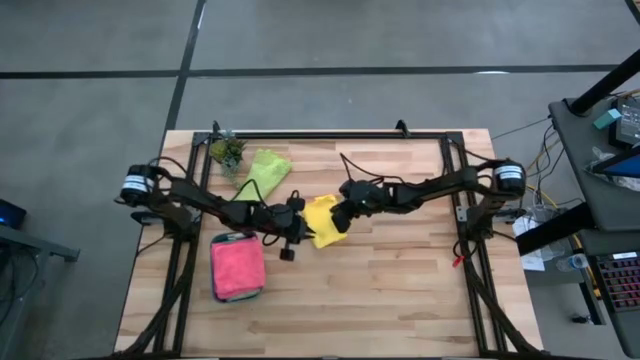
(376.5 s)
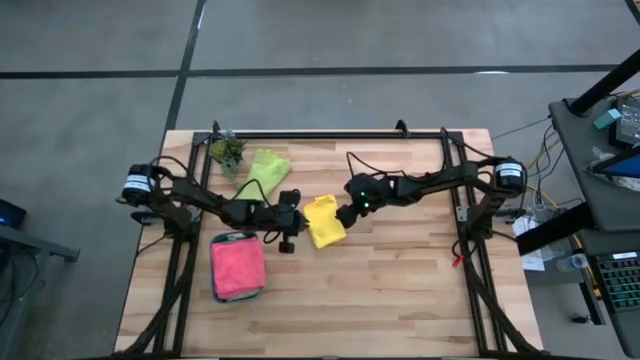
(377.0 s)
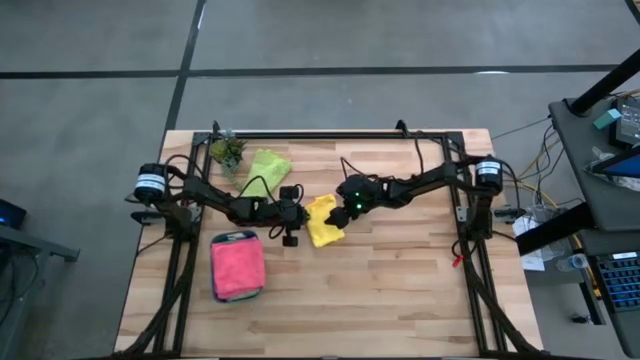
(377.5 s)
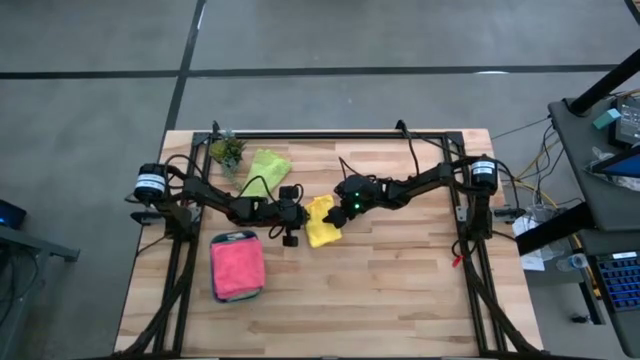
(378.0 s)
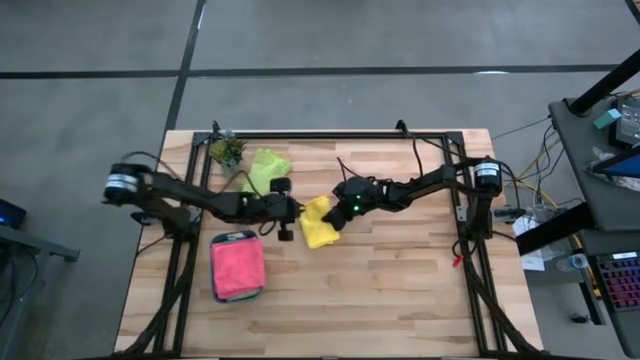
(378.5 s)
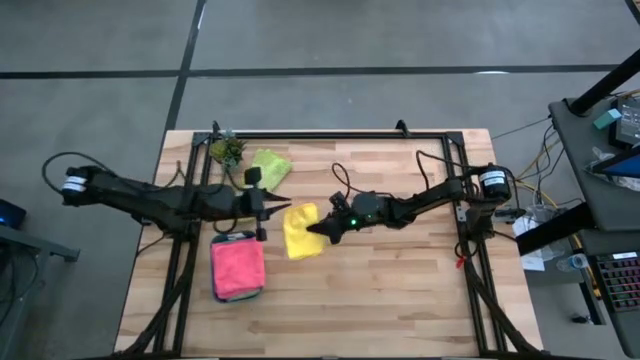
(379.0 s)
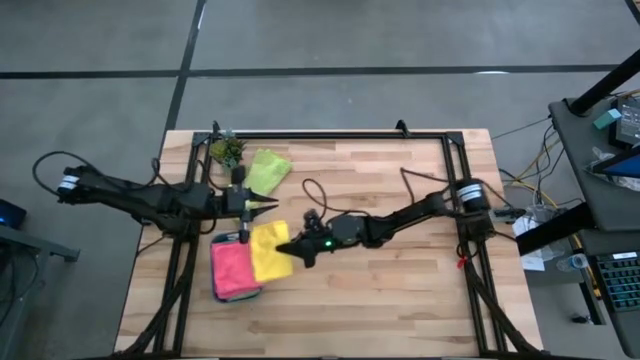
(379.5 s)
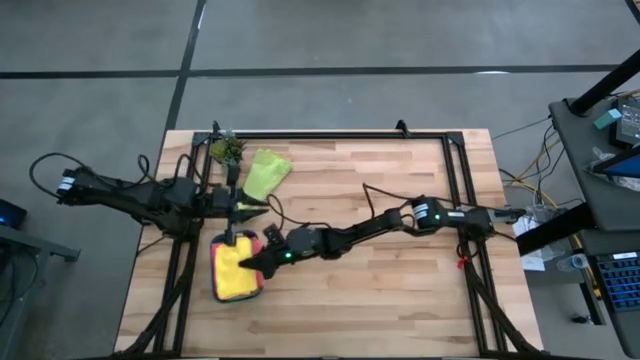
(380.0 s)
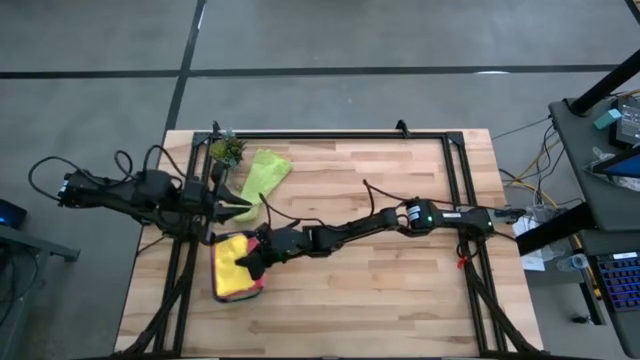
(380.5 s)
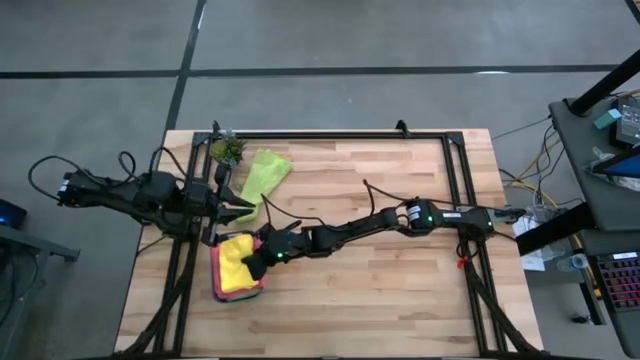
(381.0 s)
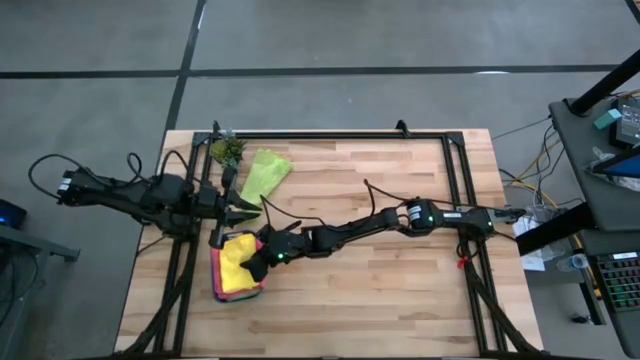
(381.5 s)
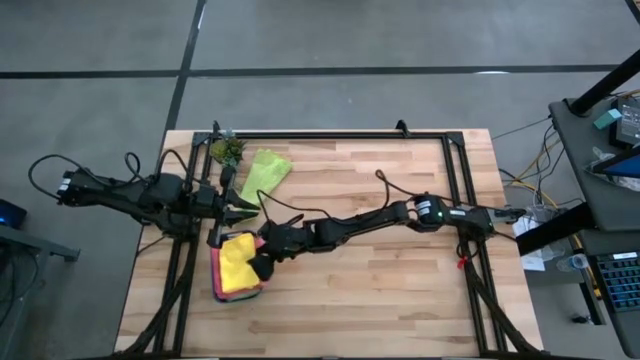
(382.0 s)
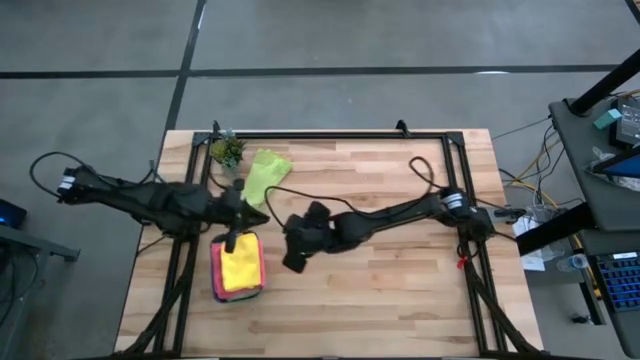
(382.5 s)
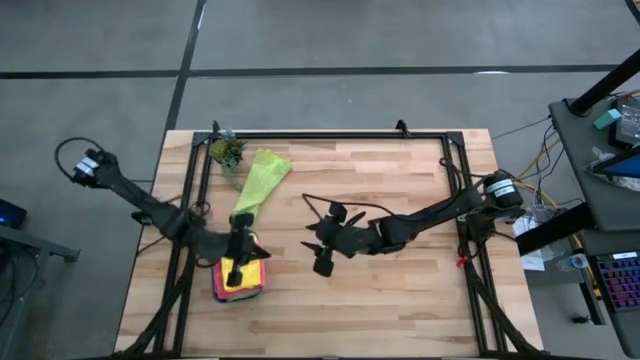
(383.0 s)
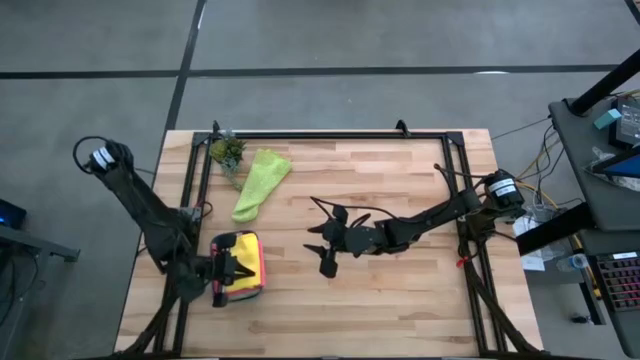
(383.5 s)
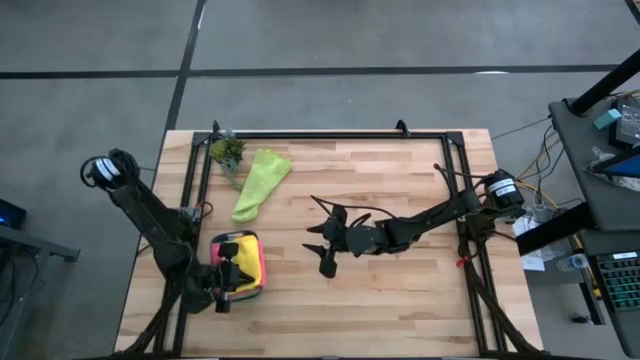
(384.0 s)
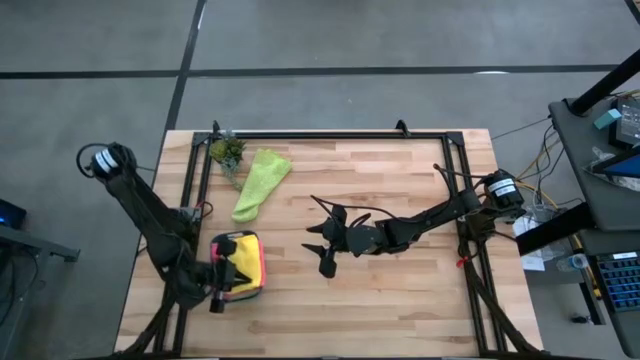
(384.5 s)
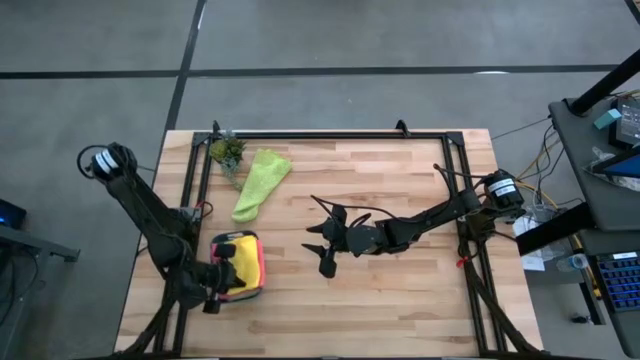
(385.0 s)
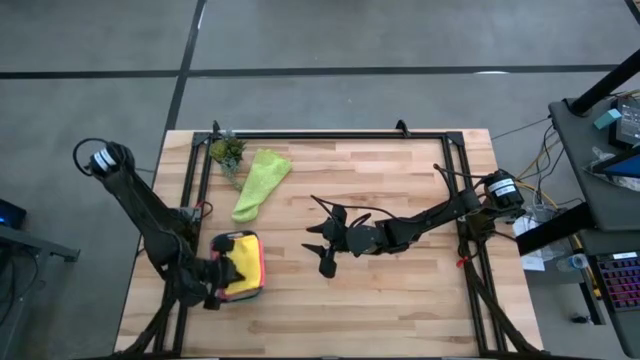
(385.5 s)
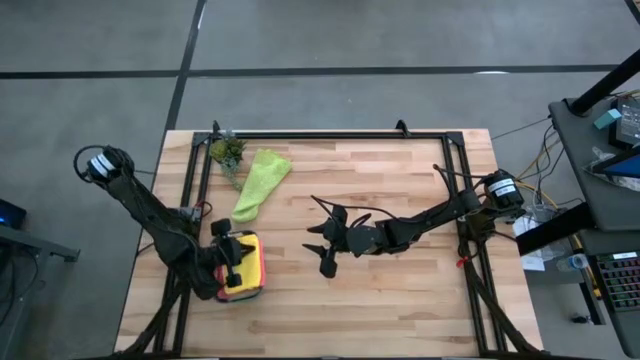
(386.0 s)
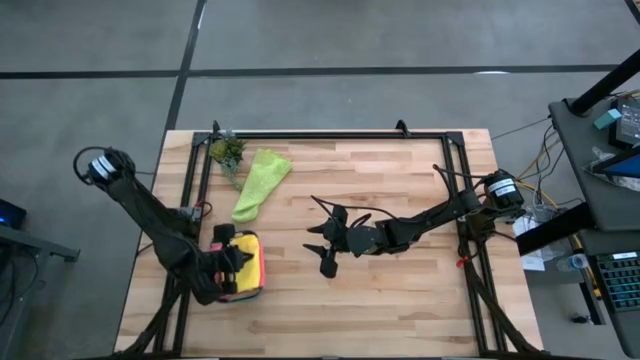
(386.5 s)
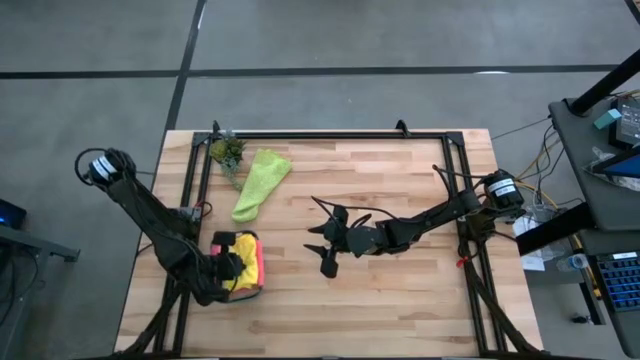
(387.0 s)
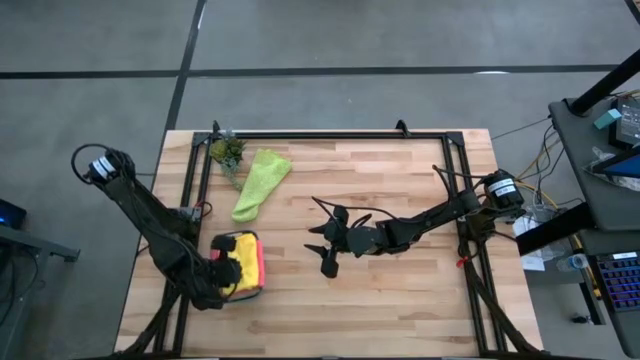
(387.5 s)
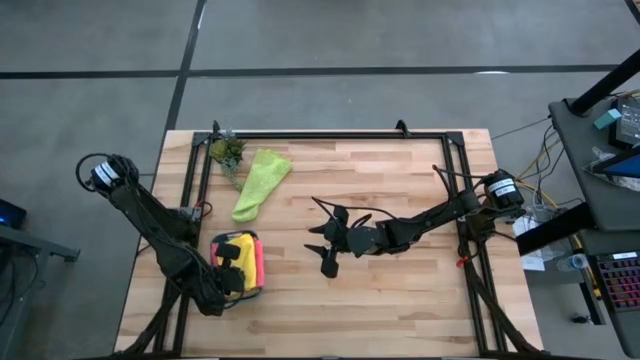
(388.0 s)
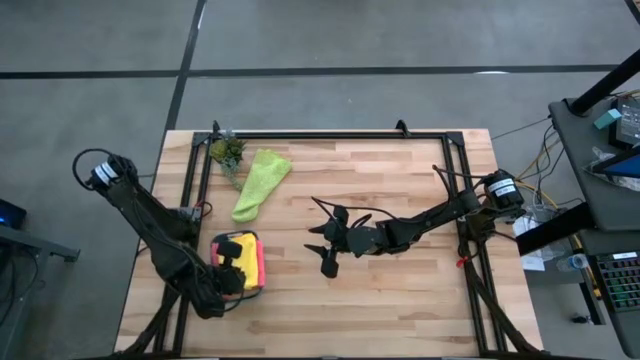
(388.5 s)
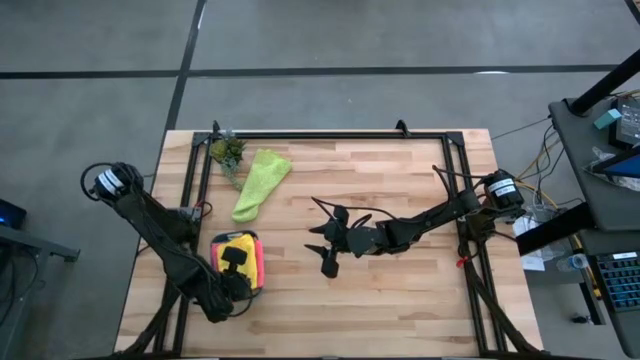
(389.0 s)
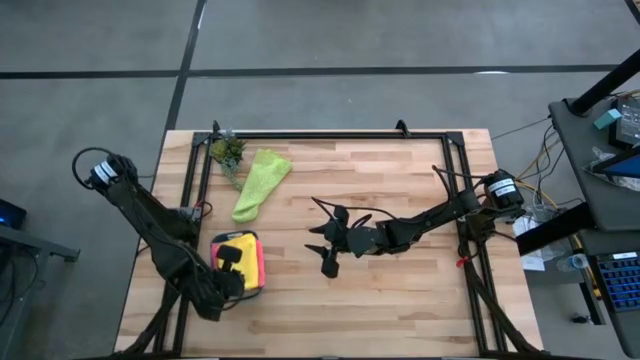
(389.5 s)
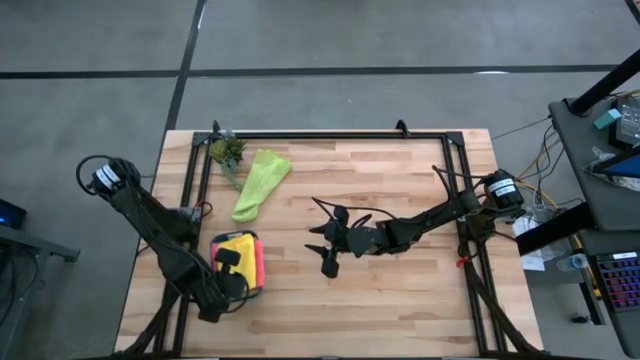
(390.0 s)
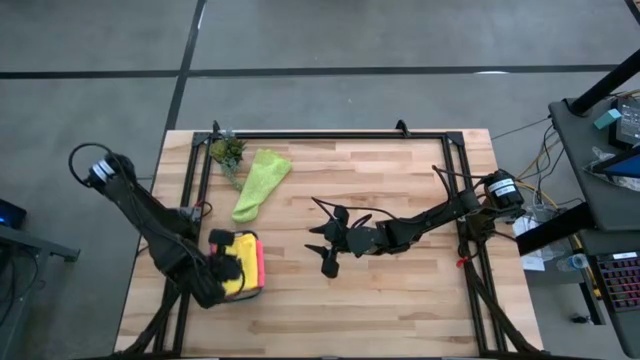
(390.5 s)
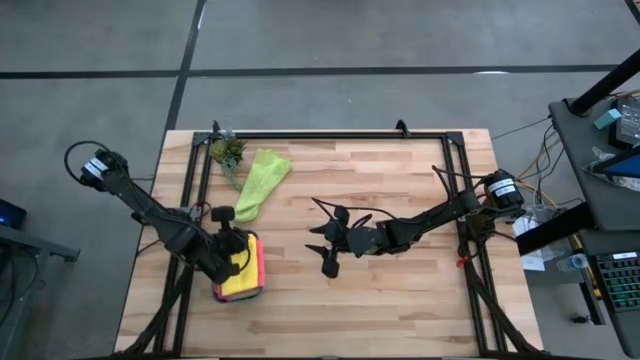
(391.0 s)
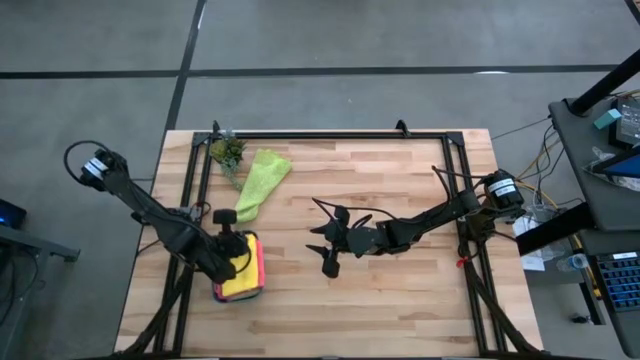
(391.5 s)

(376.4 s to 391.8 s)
Task: Fold microfiber towels
Put the yellow microfiber cloth into the blue bin

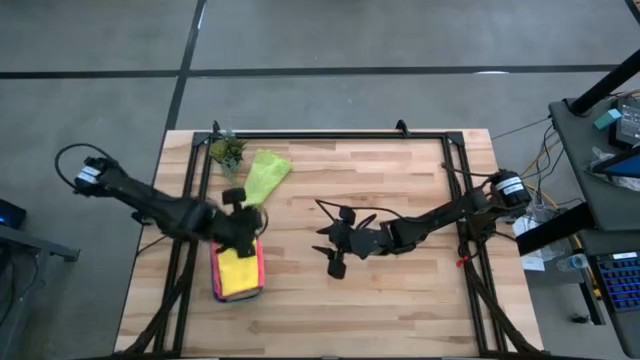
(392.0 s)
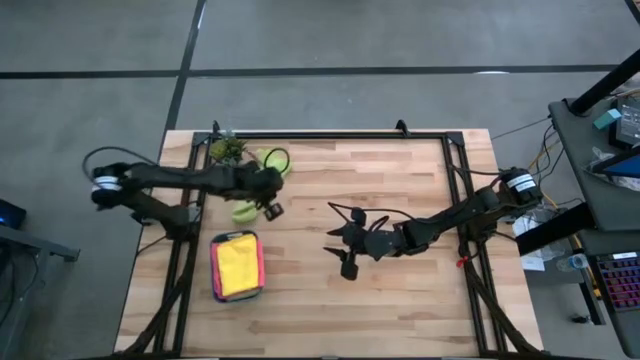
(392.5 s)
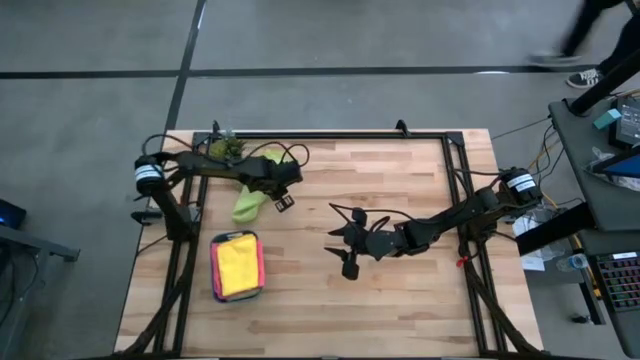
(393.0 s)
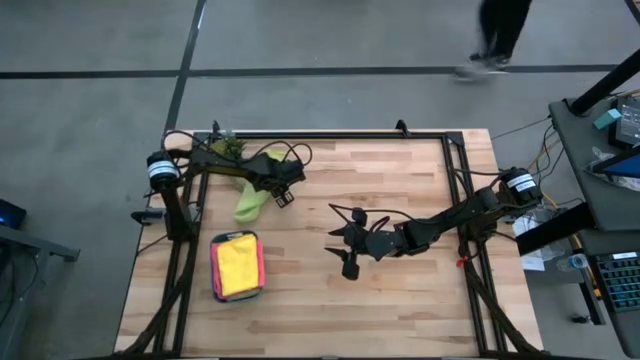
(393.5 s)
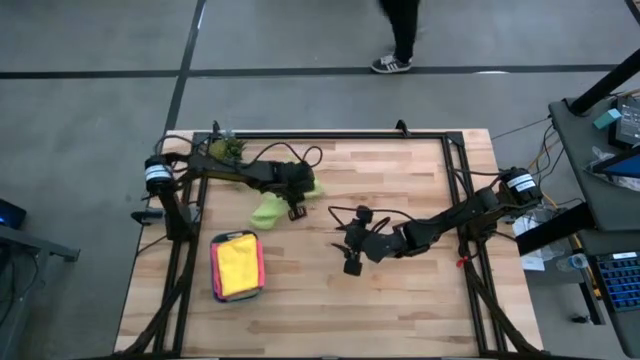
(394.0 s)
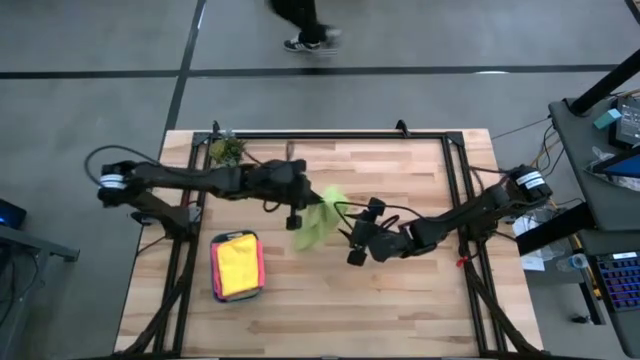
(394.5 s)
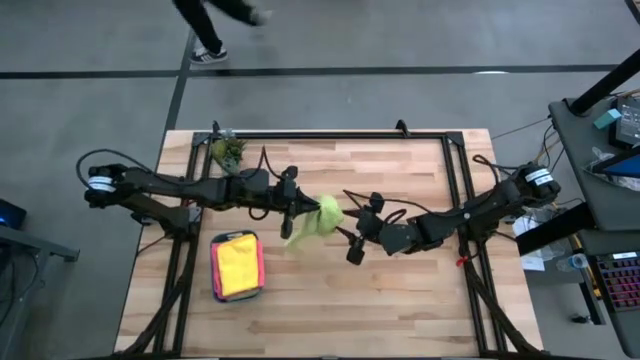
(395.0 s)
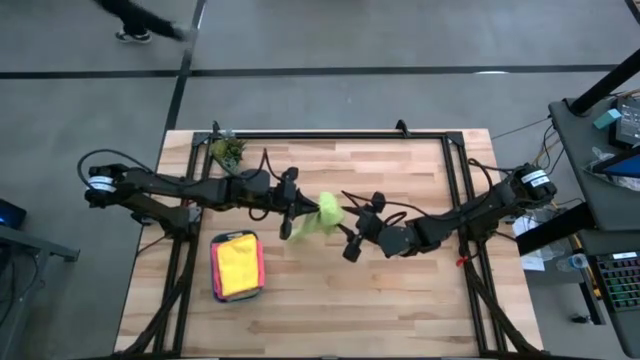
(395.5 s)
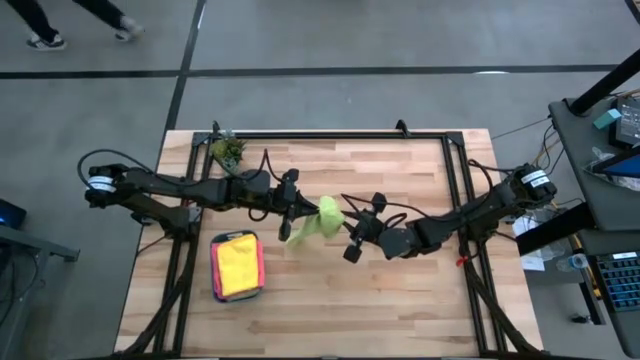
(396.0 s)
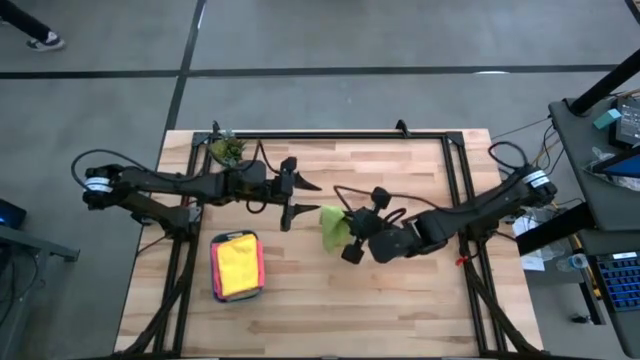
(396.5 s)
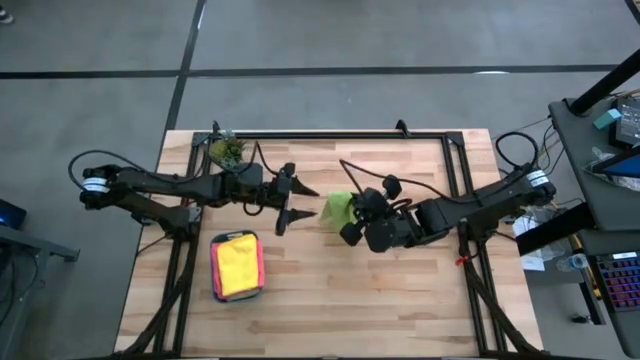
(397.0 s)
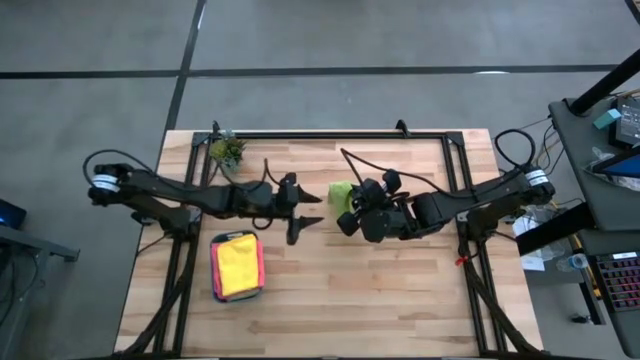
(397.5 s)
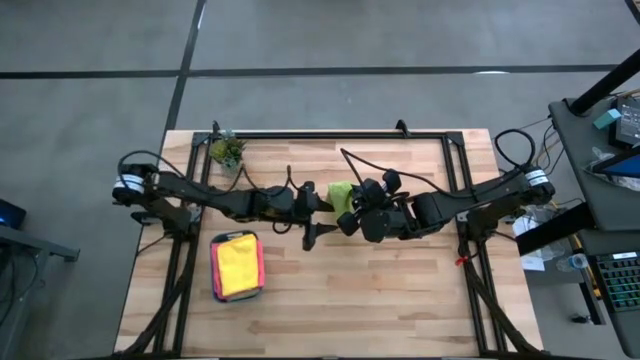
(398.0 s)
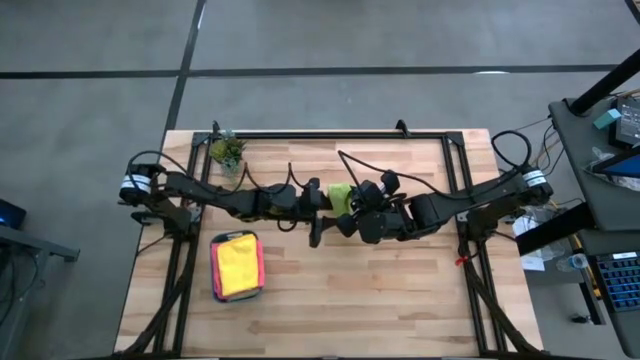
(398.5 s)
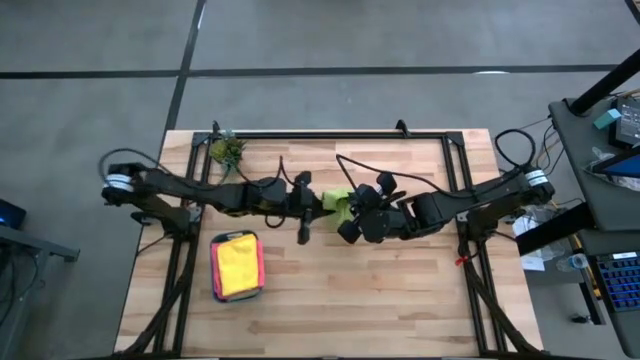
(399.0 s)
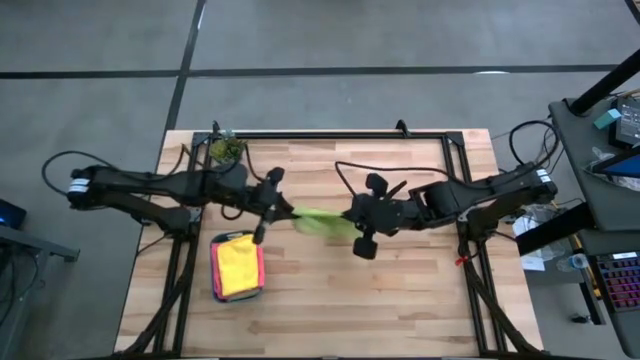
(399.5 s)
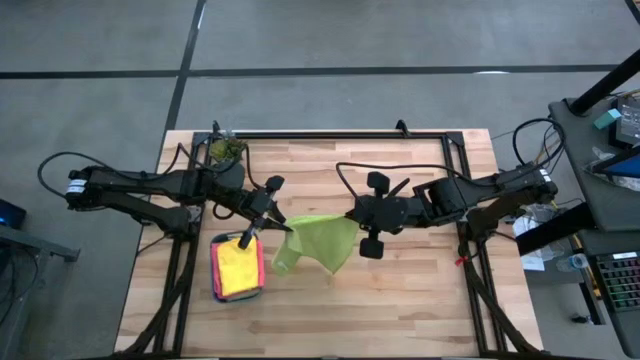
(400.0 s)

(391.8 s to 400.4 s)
Fold the green microfiber cloth
